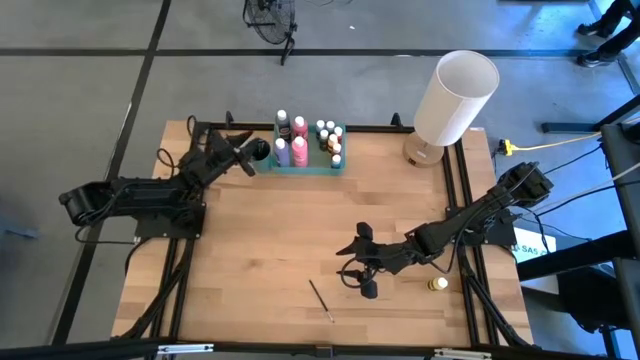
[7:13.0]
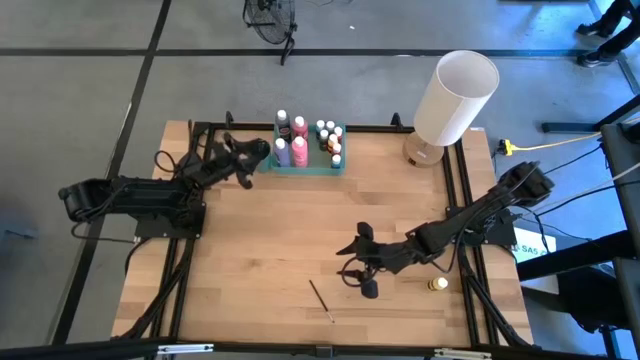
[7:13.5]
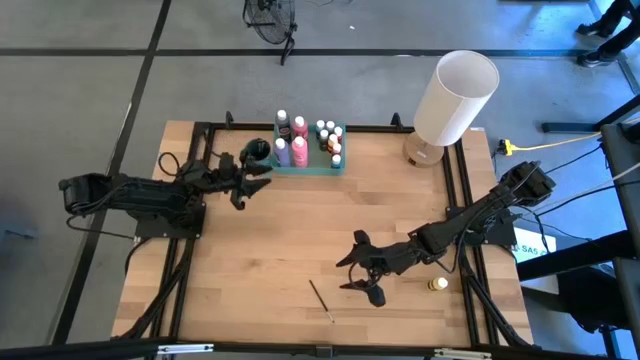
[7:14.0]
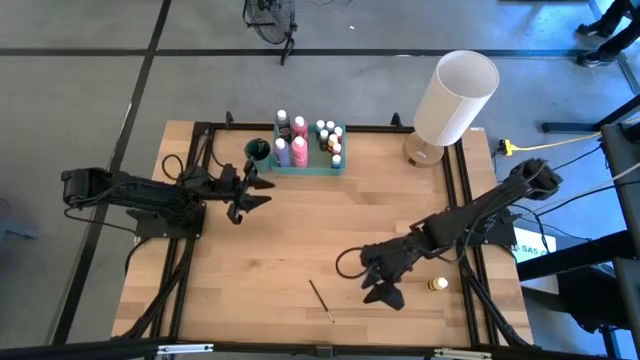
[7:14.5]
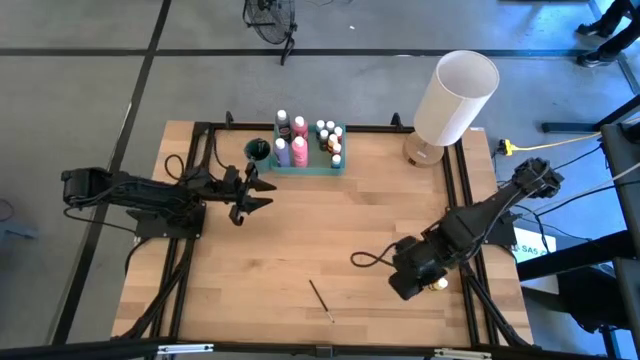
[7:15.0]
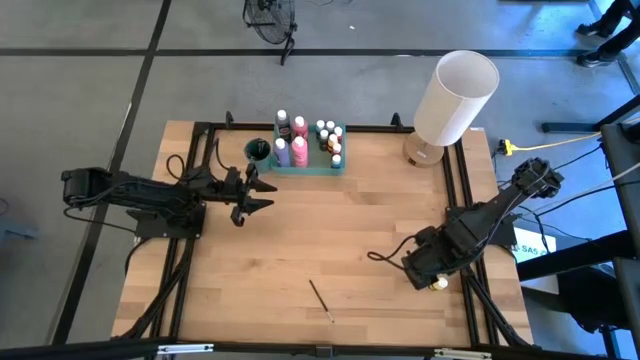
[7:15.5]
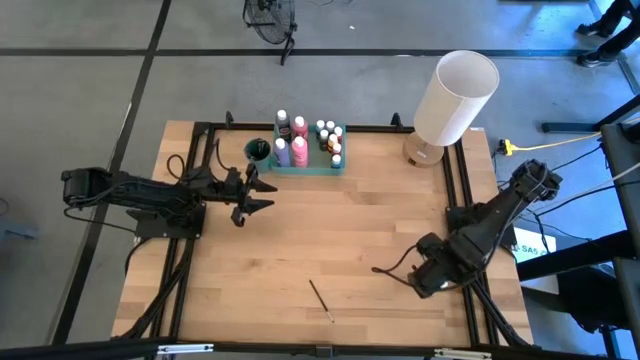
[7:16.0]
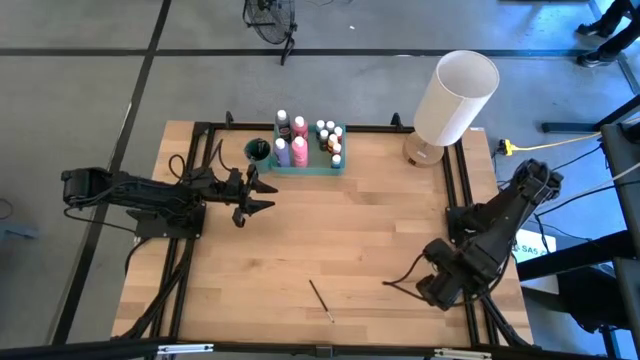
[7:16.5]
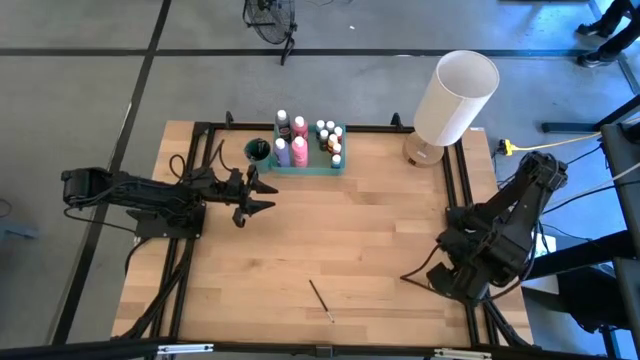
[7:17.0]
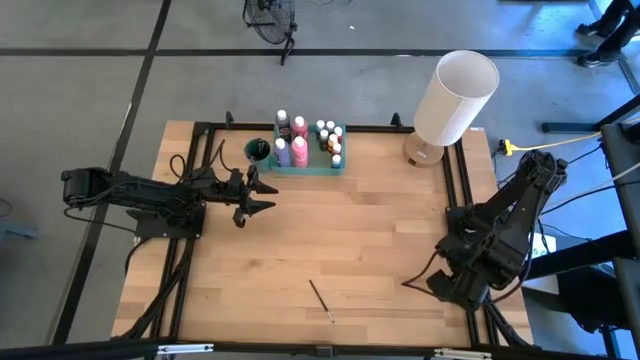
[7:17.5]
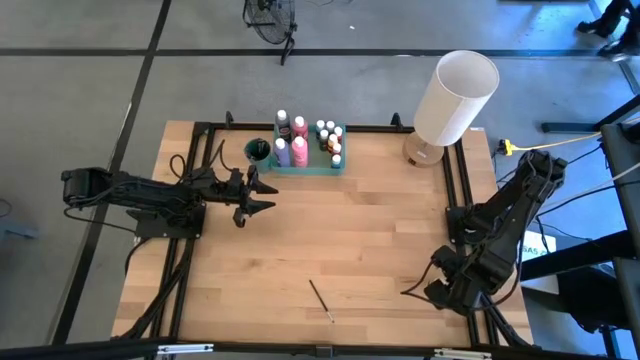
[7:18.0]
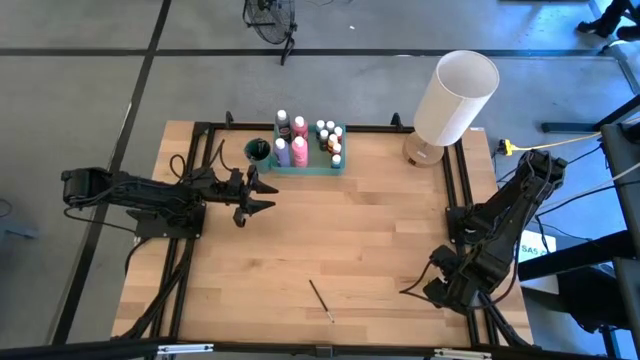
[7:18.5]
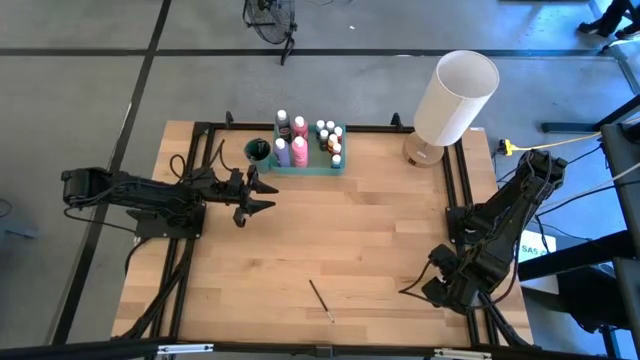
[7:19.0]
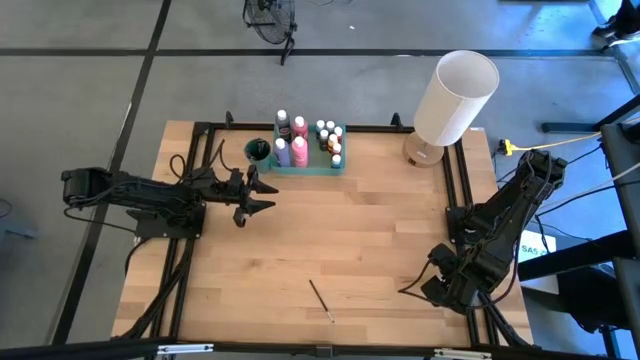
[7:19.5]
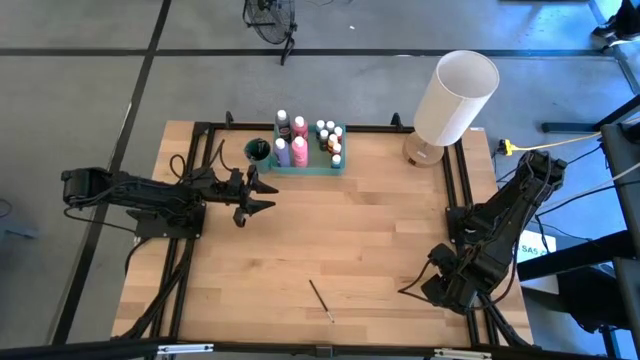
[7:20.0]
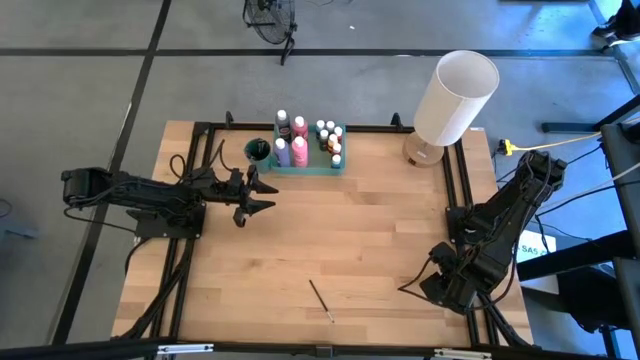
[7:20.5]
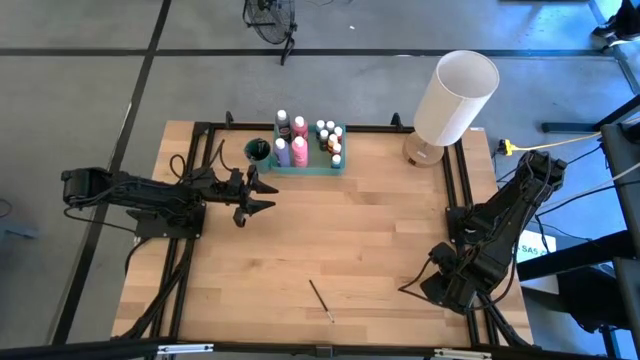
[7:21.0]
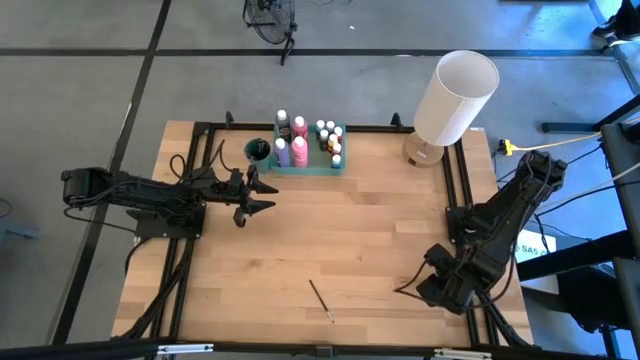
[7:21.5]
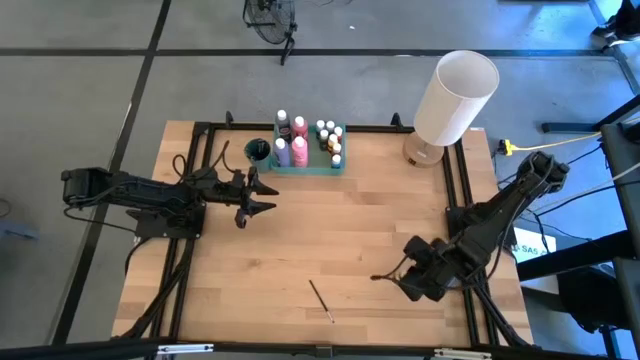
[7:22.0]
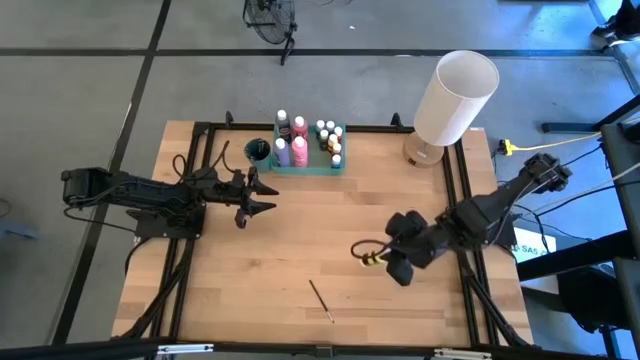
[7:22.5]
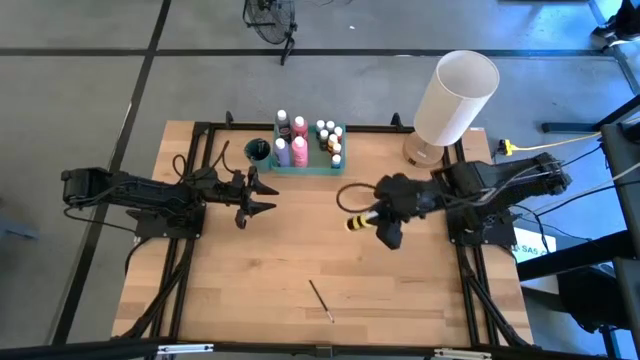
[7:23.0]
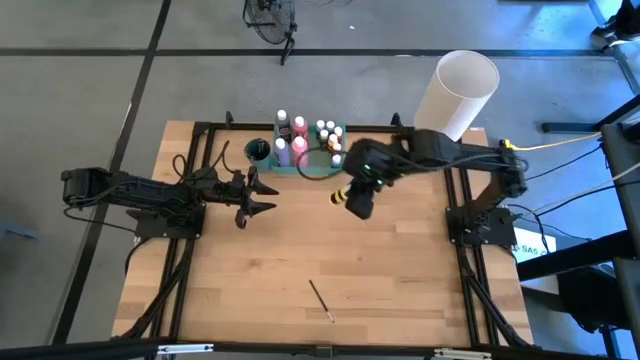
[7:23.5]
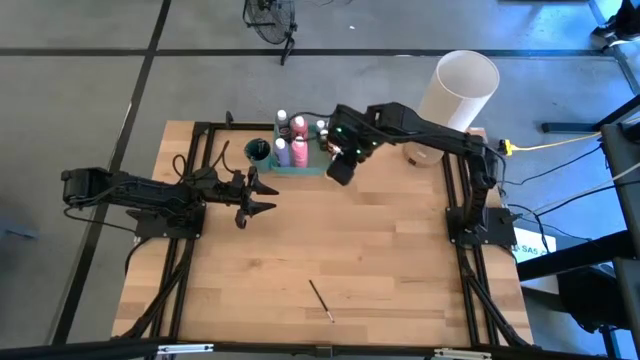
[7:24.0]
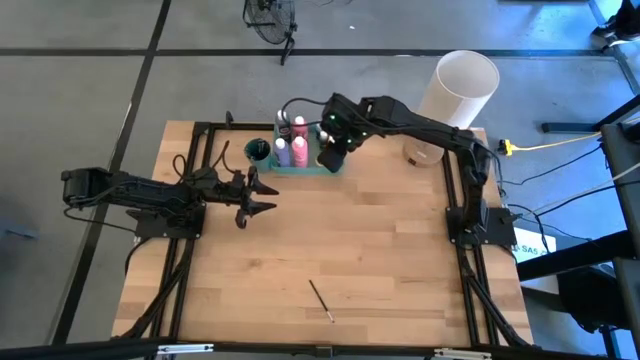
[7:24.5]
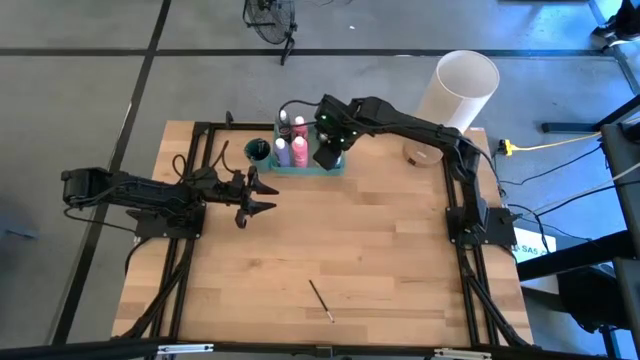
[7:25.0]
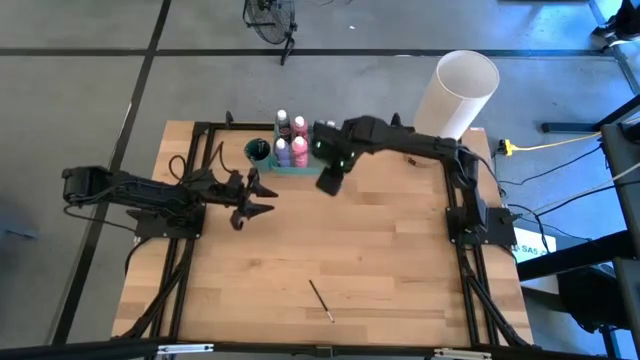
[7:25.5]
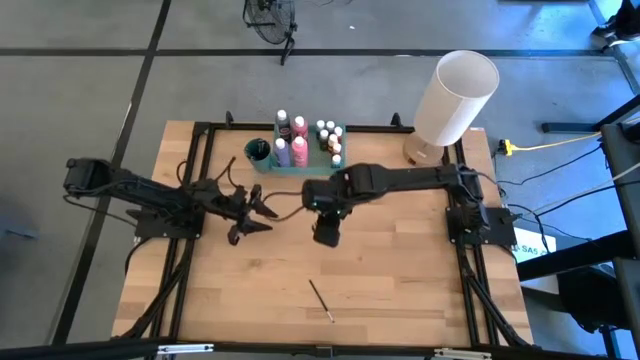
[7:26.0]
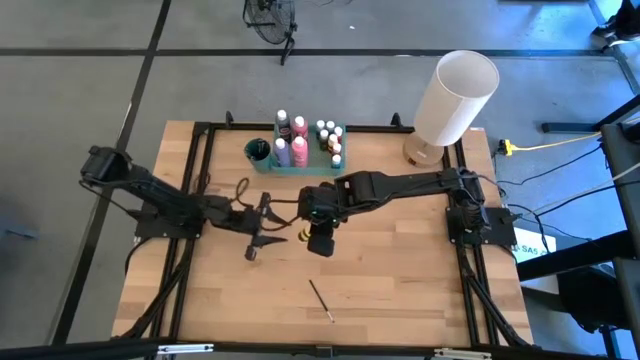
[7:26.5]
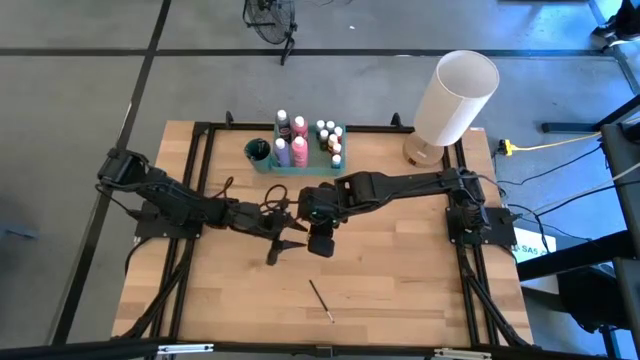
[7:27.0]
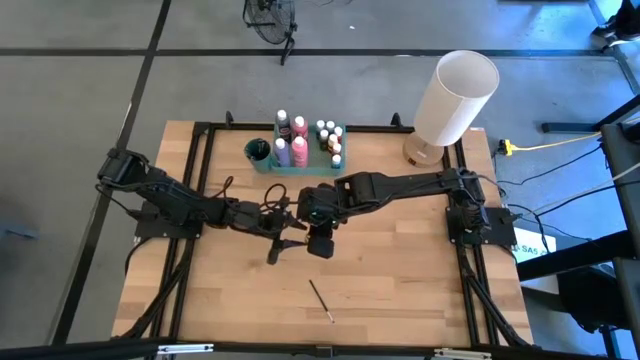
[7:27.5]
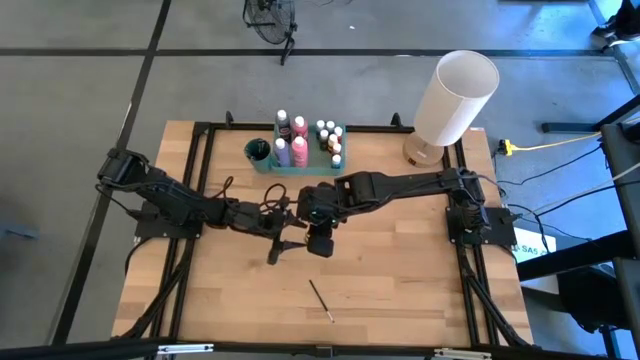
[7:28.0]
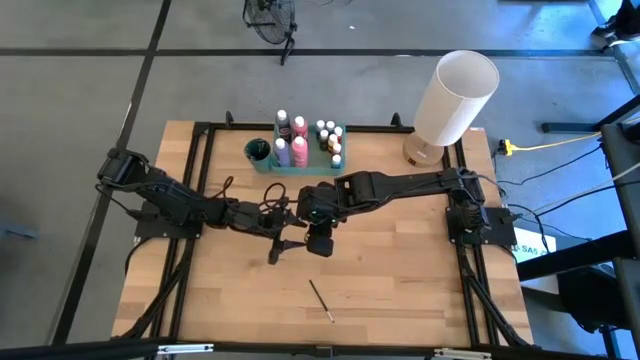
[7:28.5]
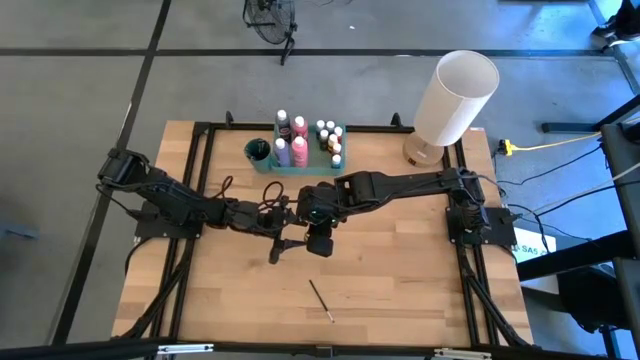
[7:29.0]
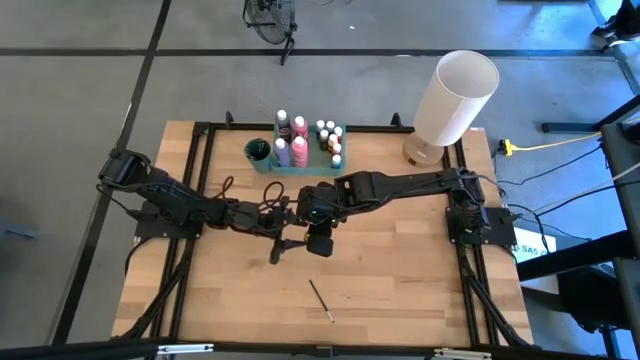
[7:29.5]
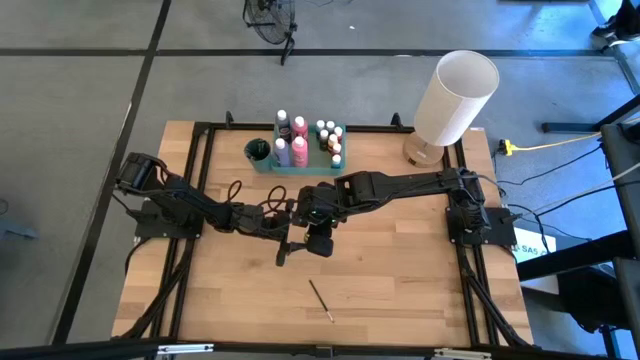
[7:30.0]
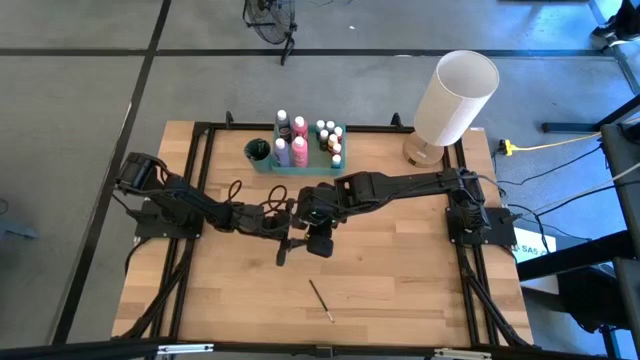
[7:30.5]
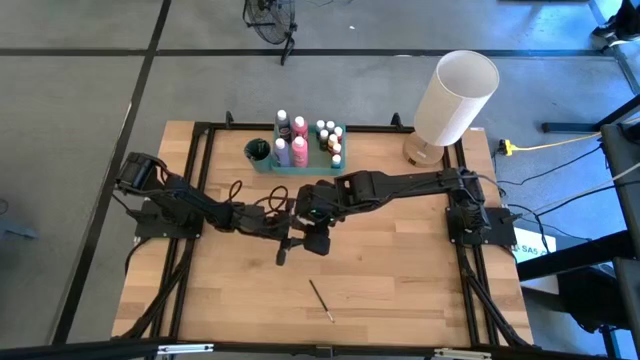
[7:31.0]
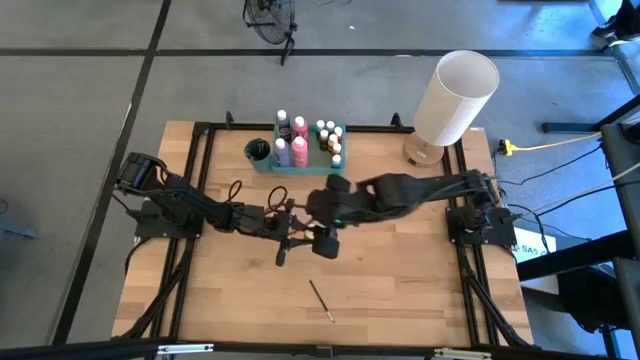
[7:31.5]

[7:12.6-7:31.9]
Task: Pick & Place Paint Supplies
Put the small yellow paint bottle into the green bin

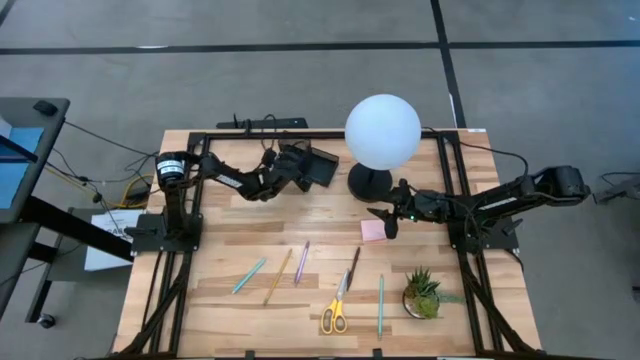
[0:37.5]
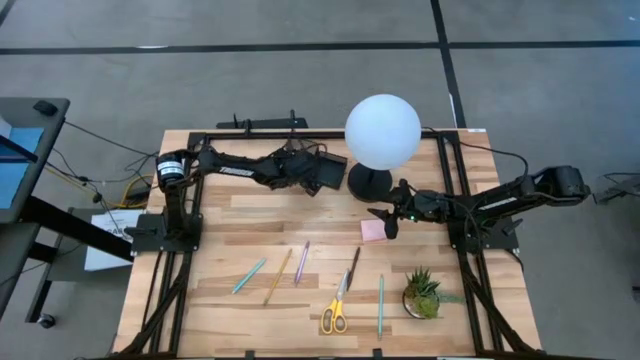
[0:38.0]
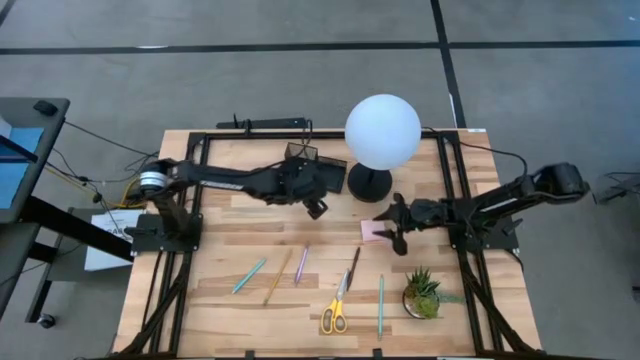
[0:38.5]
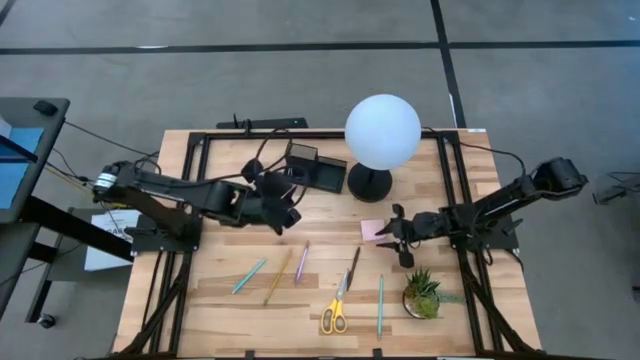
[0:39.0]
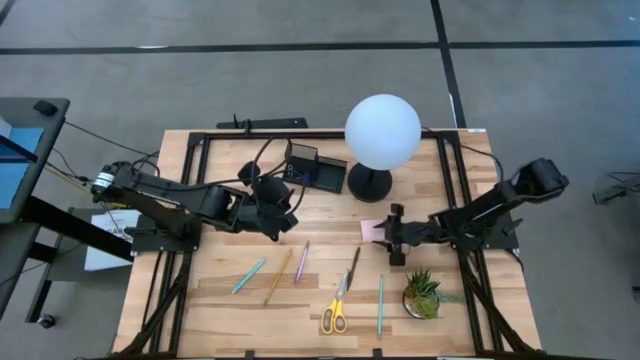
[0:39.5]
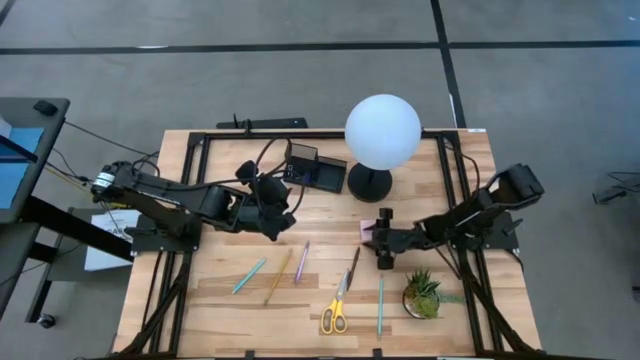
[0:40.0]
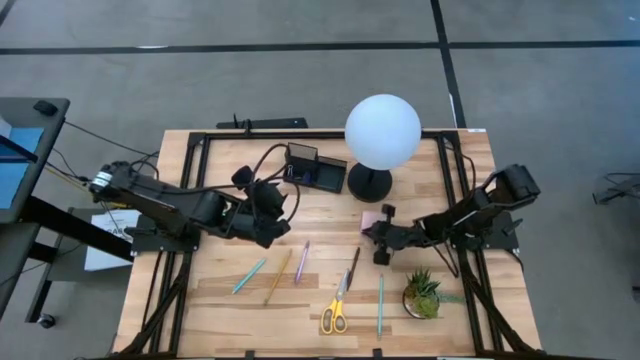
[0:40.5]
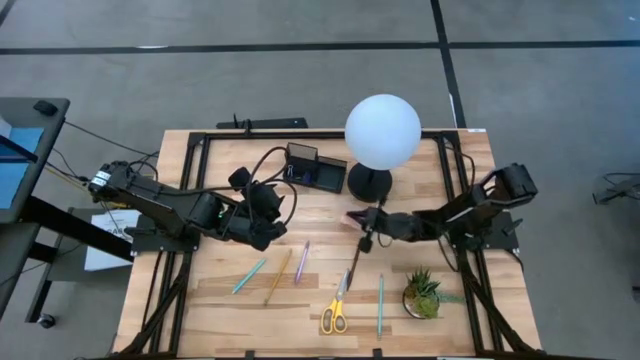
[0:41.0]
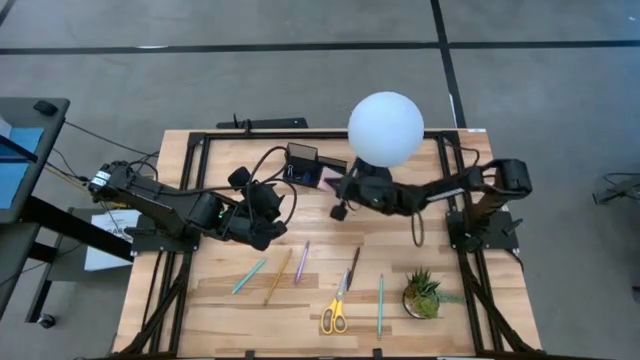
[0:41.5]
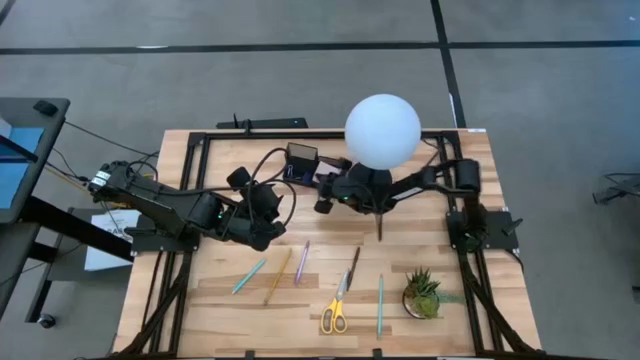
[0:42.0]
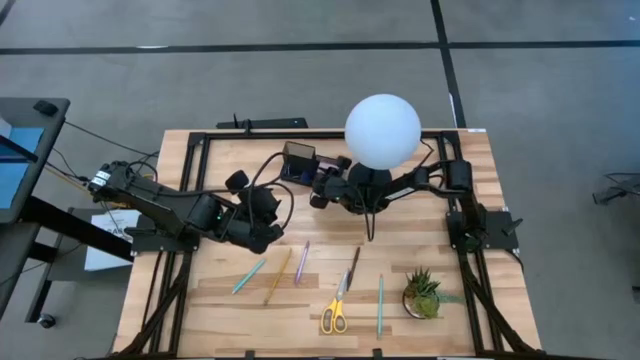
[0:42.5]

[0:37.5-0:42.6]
Task: Pick and place office supplies into organizer
Put the pink sticky notes into the black desk organizer
